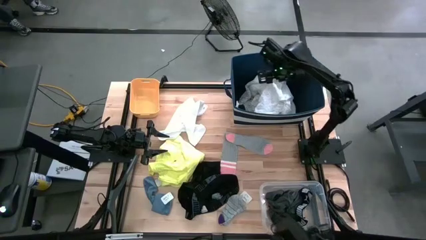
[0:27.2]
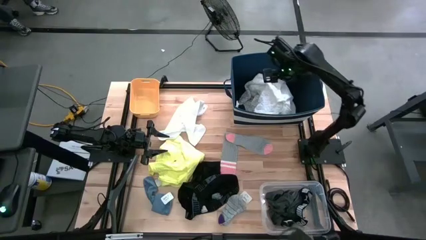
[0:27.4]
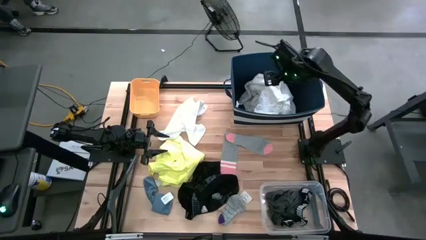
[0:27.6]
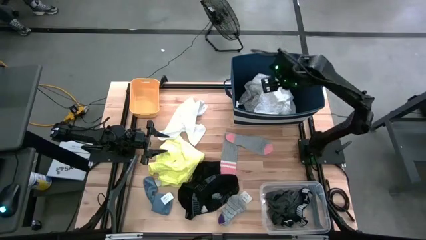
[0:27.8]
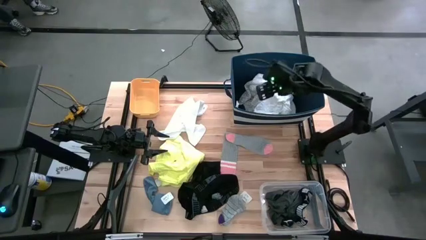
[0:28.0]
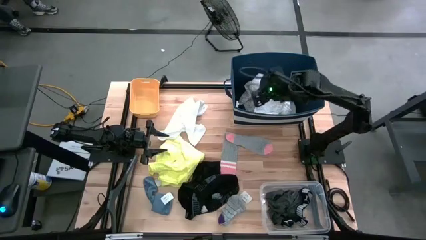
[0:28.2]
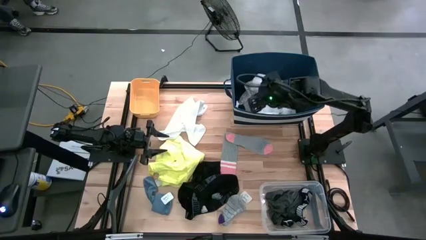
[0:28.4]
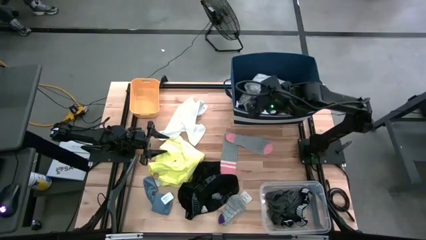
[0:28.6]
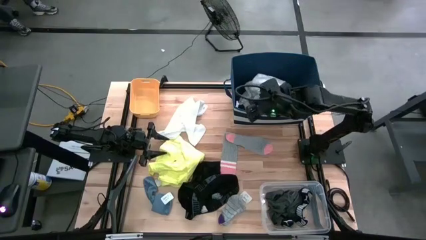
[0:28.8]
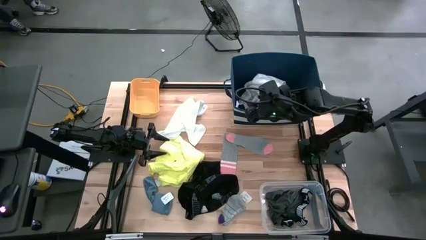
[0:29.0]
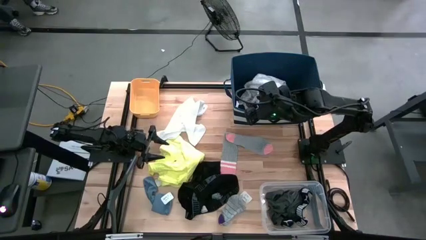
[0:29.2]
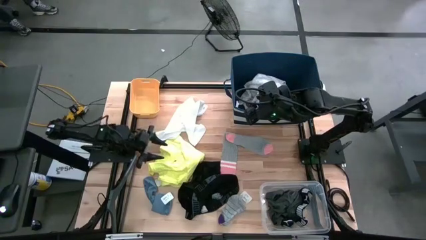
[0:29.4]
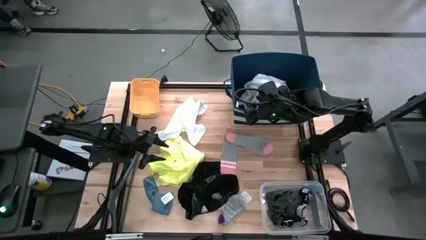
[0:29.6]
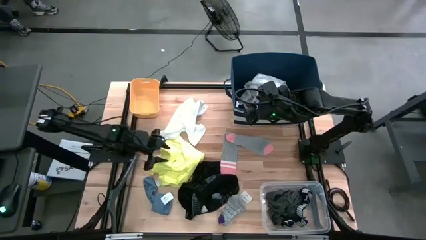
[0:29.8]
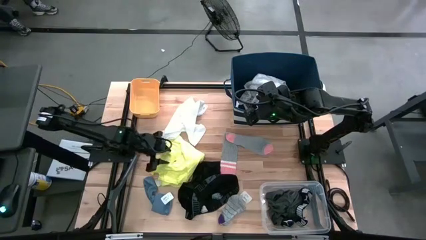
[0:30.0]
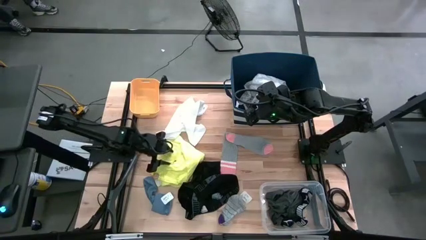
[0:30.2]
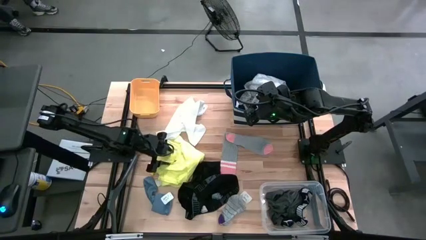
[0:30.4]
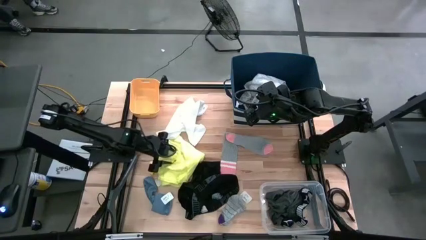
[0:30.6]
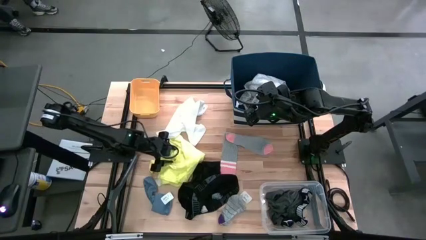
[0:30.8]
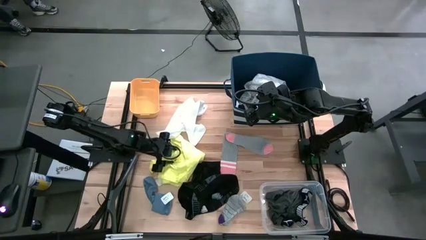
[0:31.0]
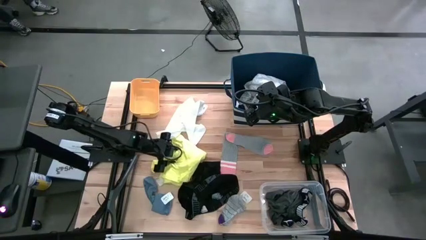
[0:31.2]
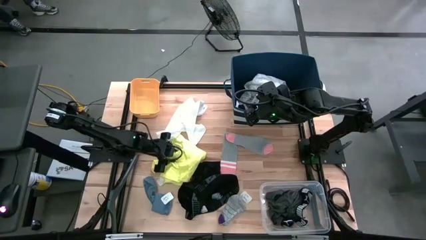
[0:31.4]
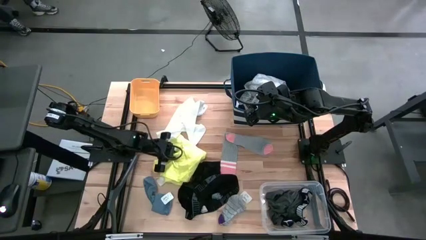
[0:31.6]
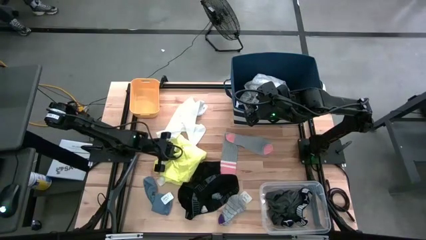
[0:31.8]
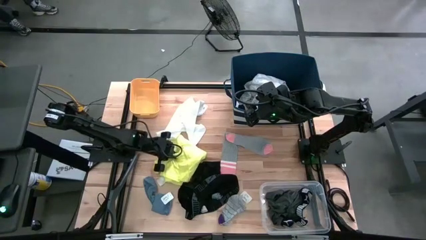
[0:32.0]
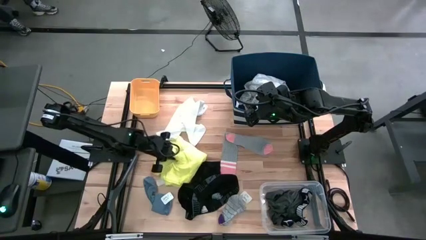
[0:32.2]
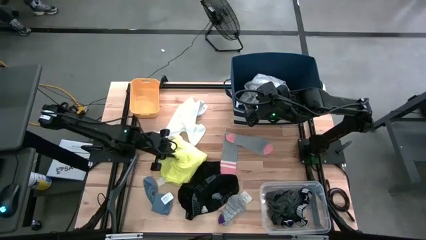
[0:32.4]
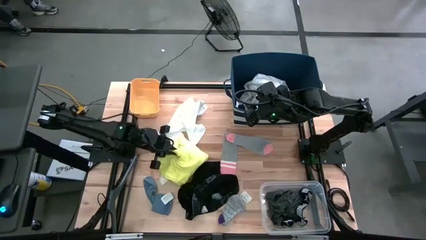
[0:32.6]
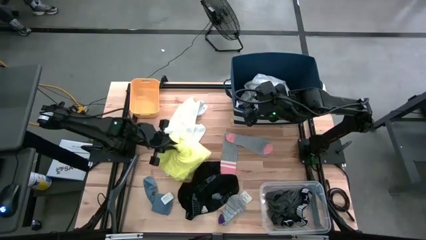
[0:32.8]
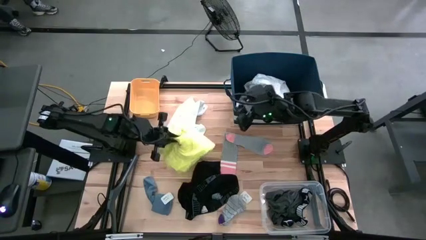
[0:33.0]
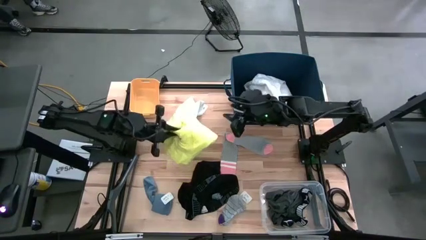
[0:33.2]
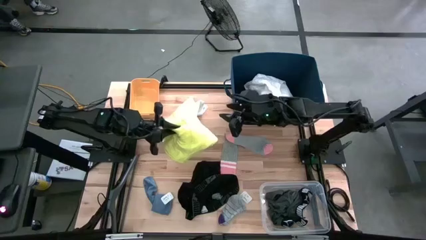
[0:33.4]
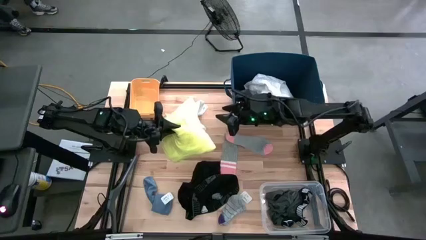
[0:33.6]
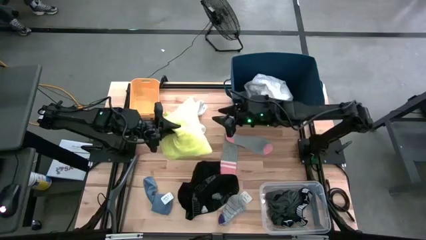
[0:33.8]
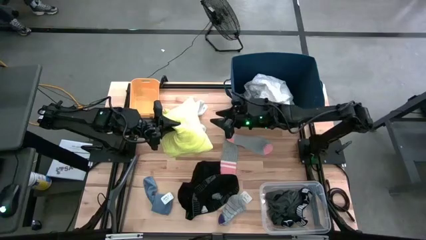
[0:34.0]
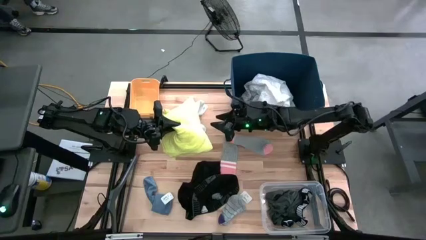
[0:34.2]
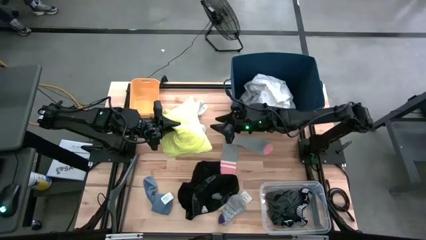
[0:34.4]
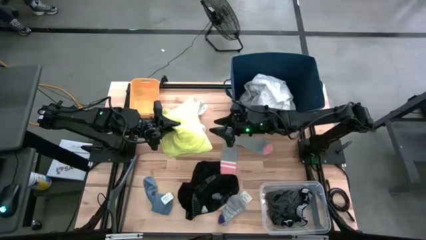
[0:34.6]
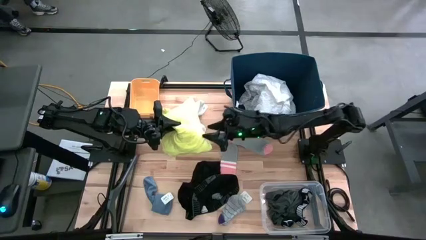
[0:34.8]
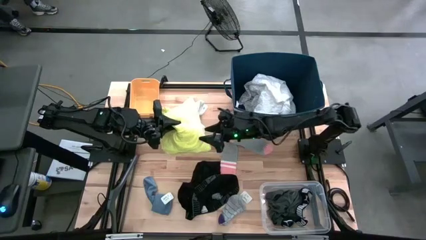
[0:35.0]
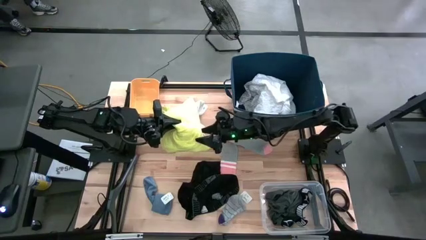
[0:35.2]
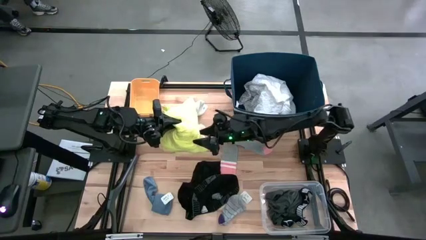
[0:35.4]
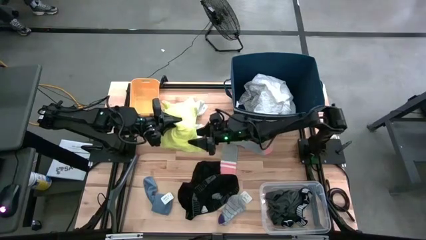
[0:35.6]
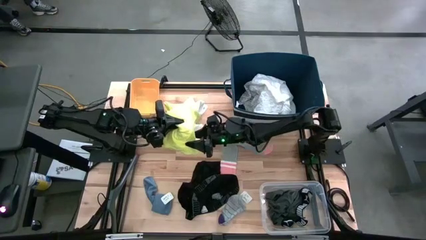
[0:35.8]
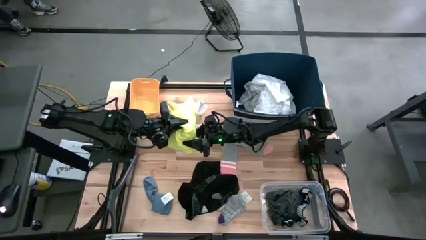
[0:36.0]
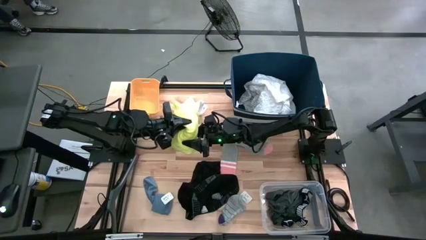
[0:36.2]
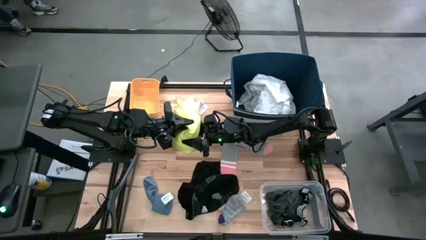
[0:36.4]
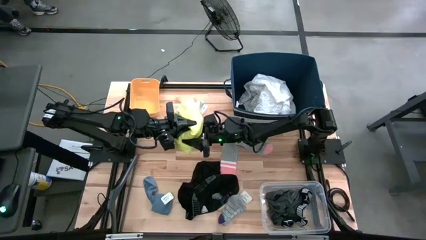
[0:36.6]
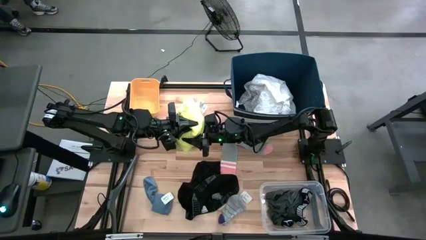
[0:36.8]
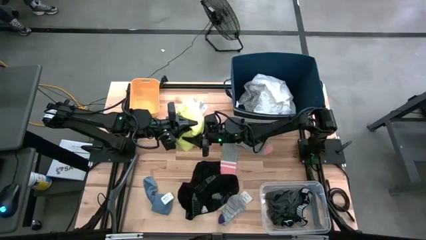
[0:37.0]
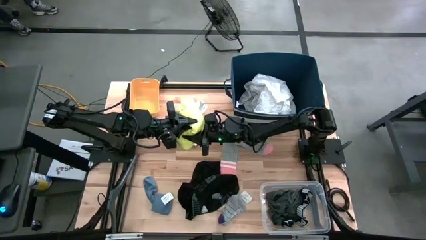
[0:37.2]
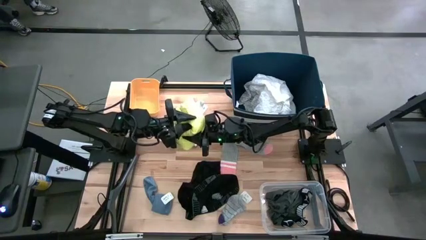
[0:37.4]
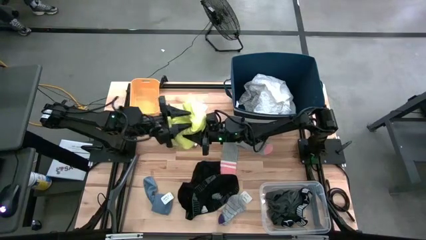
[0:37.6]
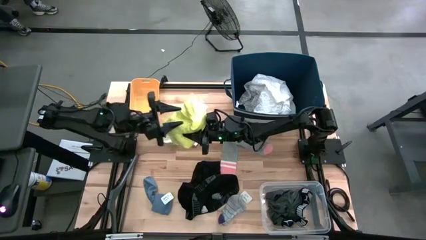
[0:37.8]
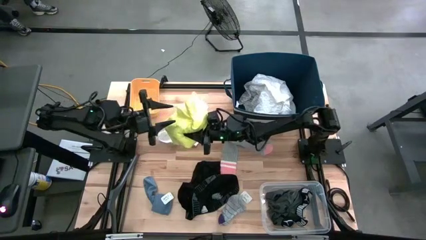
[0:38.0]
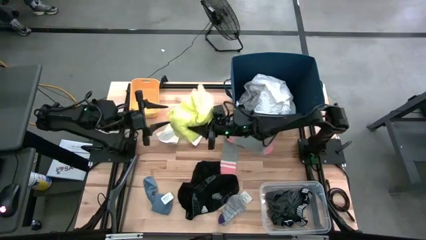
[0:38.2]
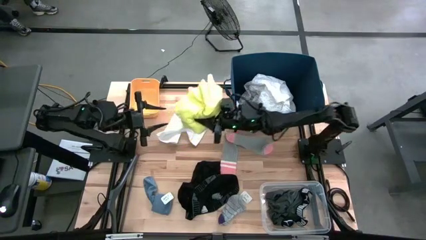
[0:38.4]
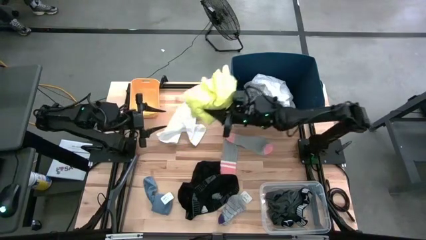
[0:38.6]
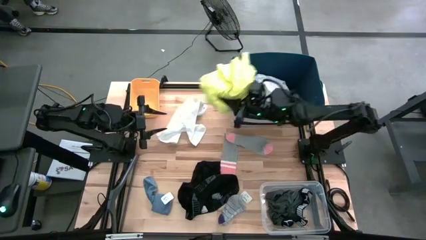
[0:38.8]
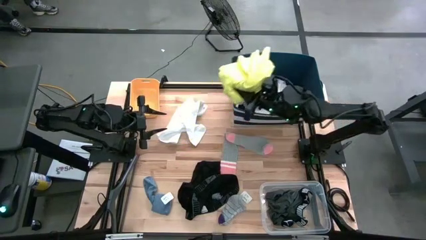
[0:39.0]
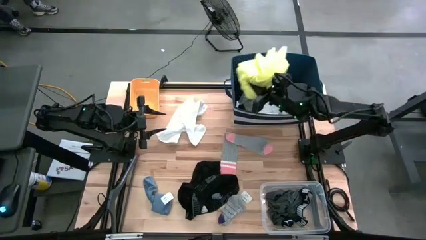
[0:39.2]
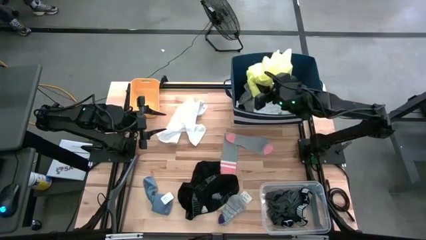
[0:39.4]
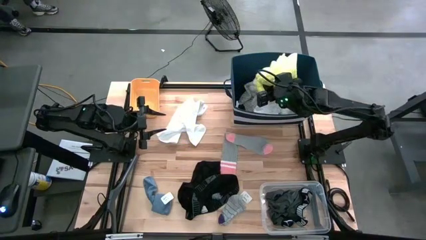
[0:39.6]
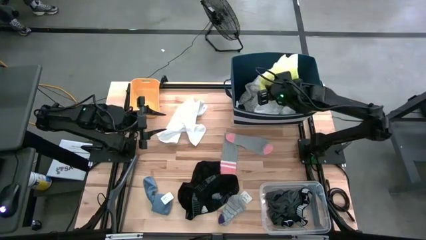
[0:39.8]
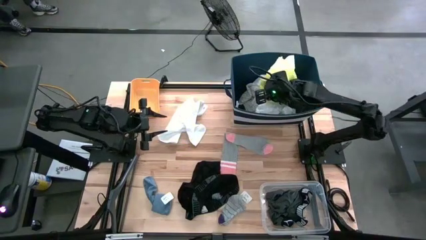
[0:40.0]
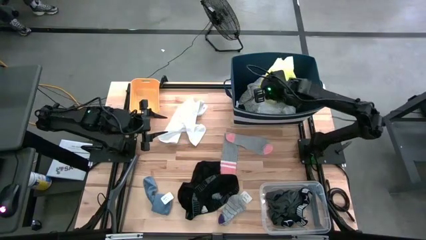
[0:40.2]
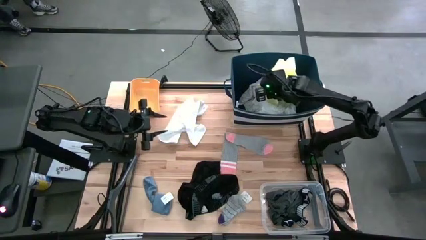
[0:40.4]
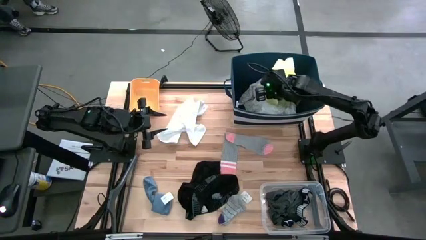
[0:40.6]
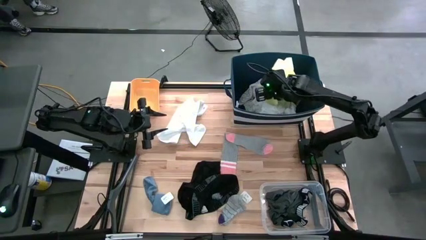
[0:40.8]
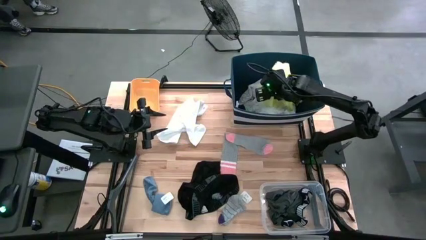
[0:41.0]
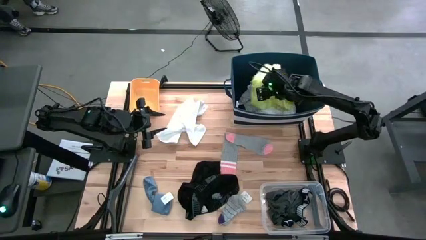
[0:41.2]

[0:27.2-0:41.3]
Task: Pick & Place Cloths
Put the yellow shirt into the blue bin
